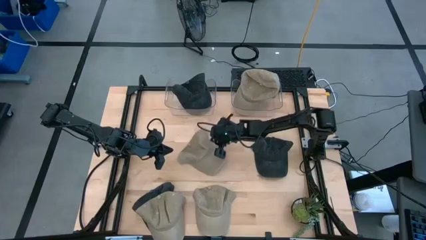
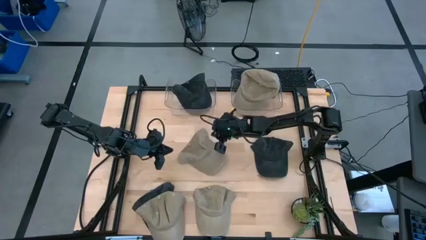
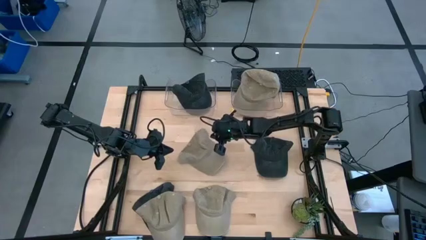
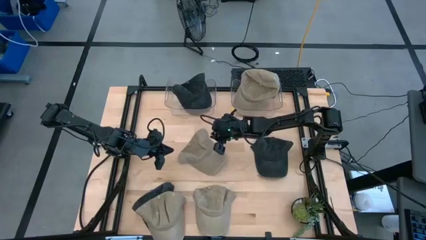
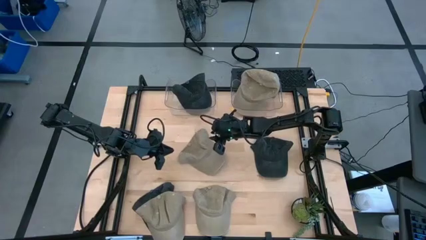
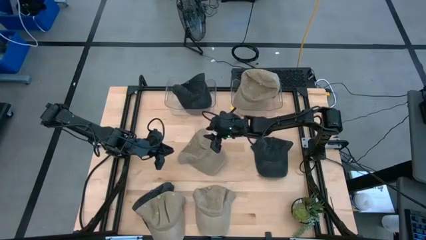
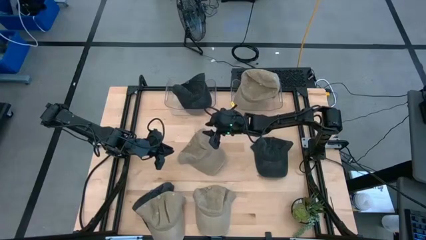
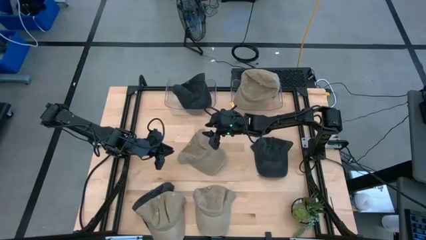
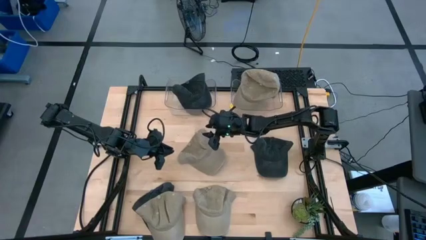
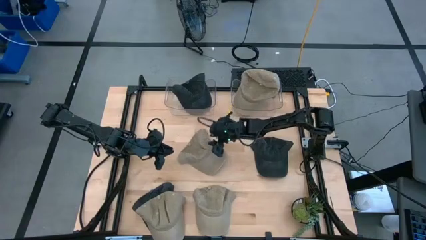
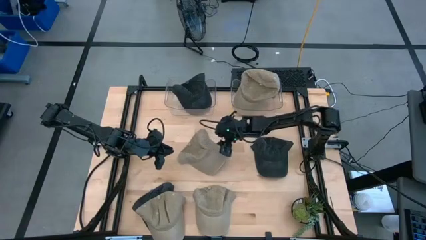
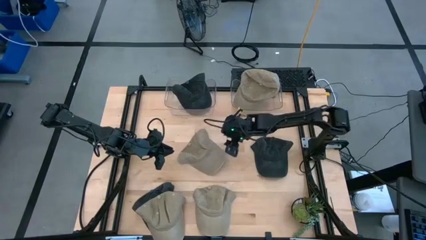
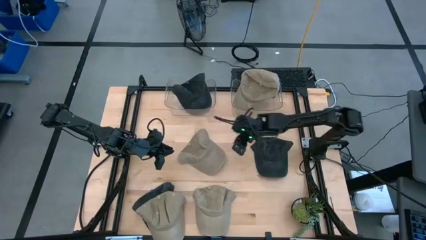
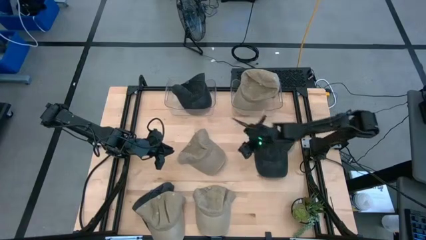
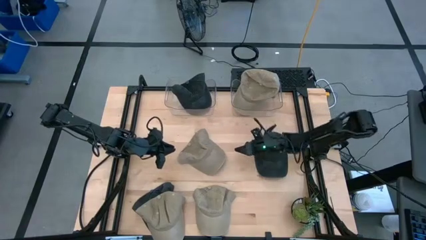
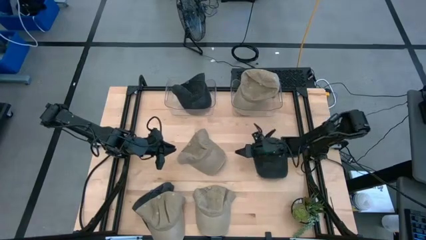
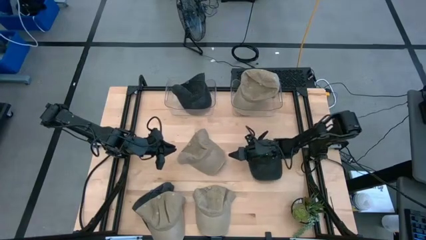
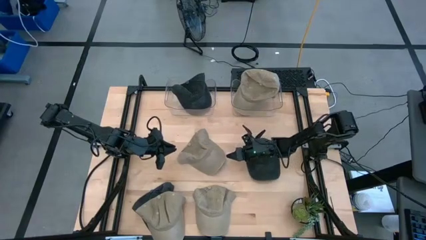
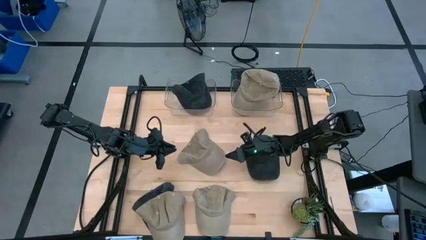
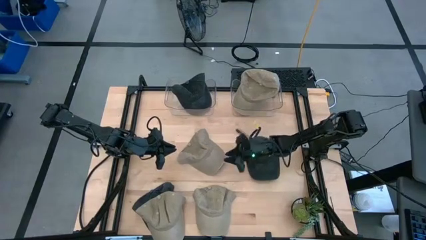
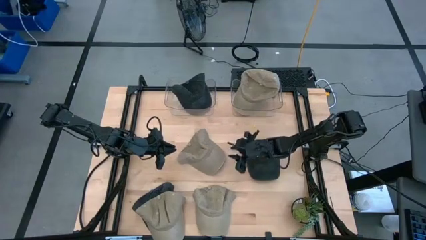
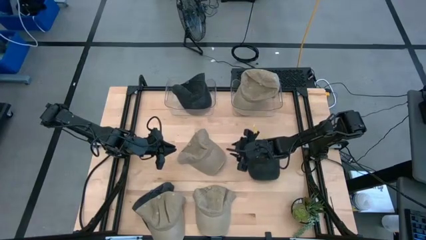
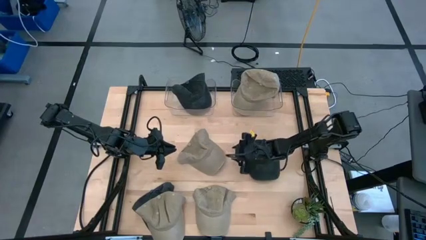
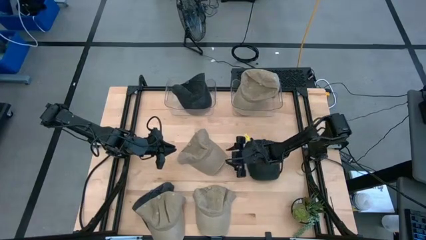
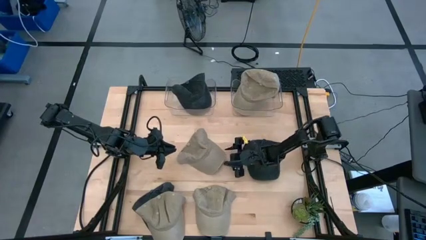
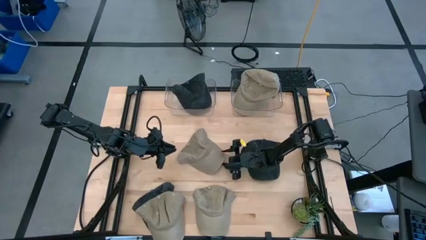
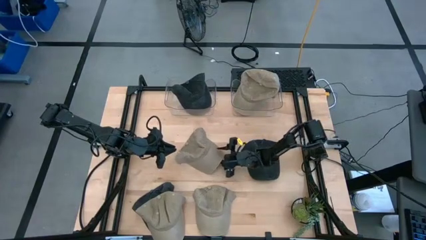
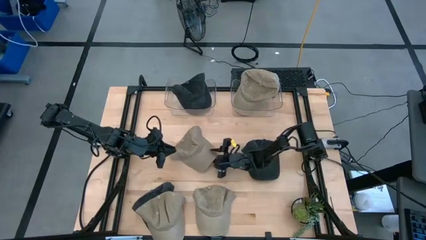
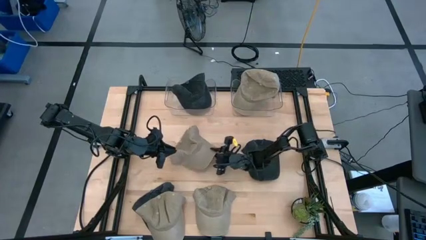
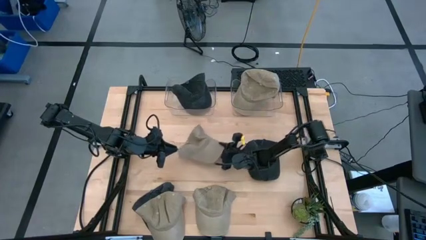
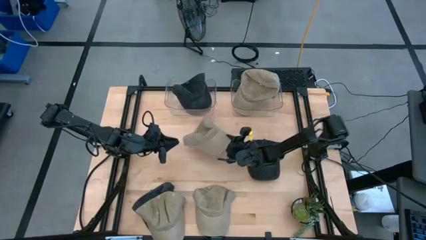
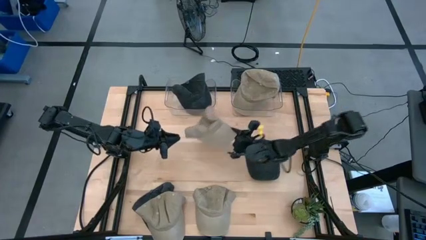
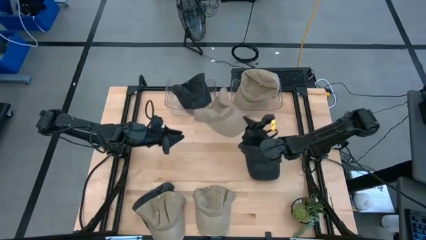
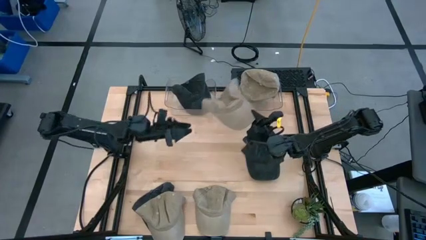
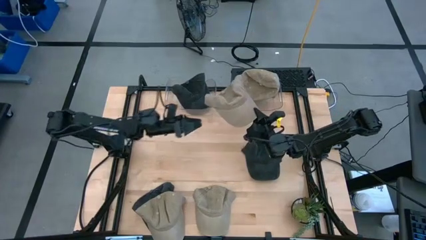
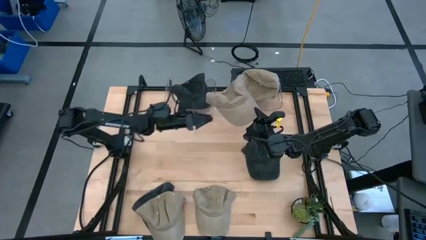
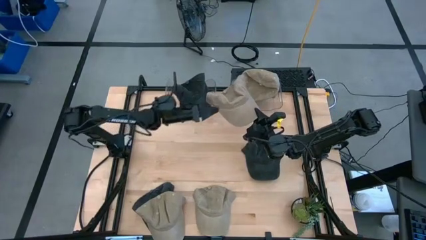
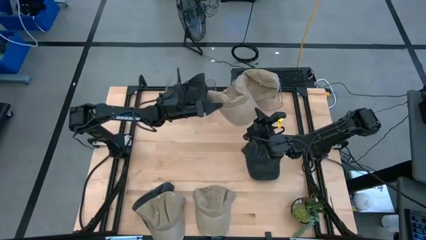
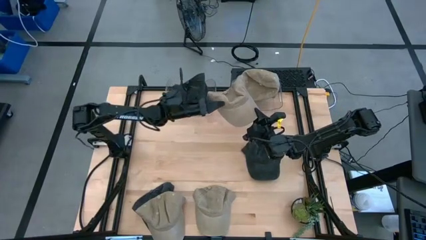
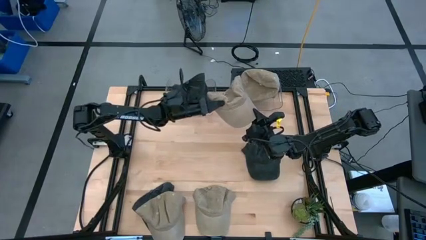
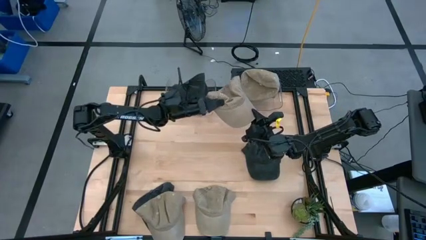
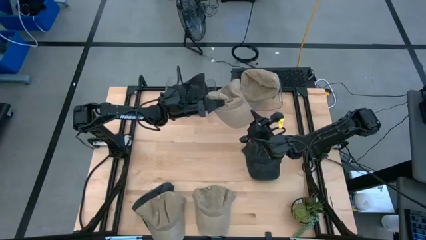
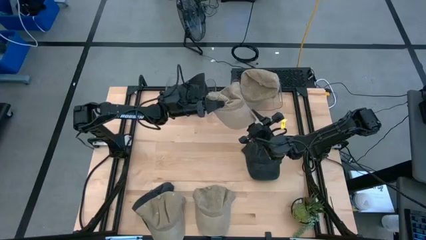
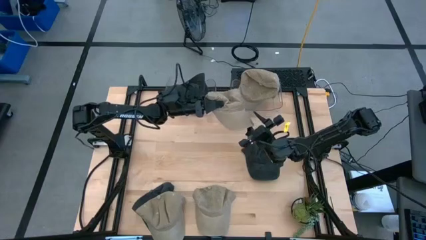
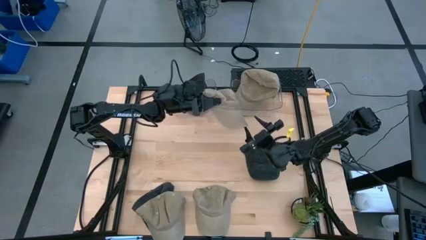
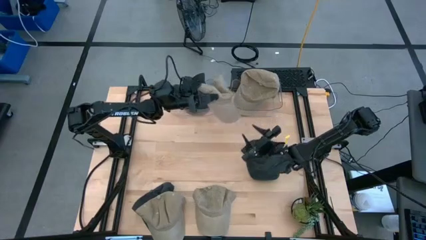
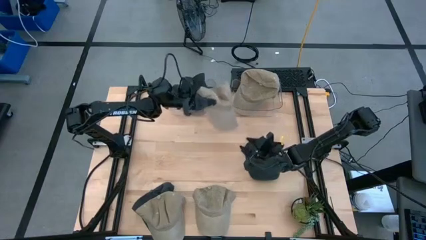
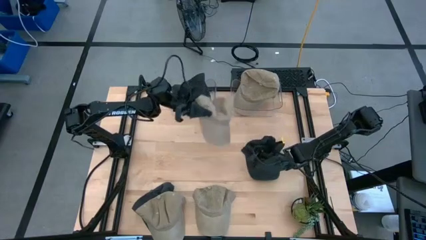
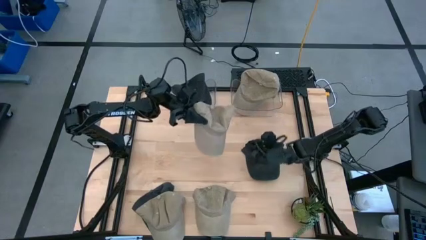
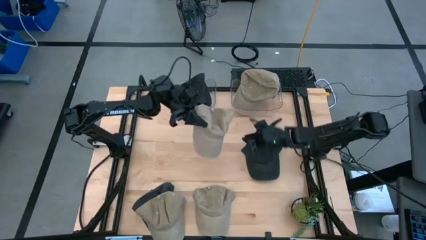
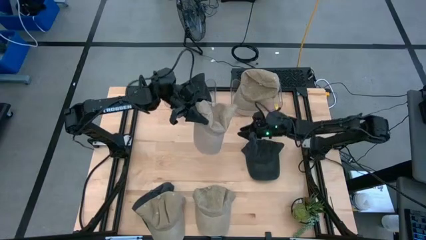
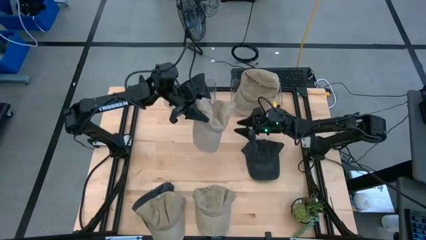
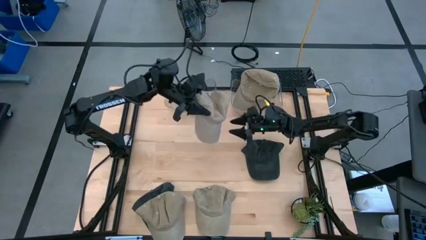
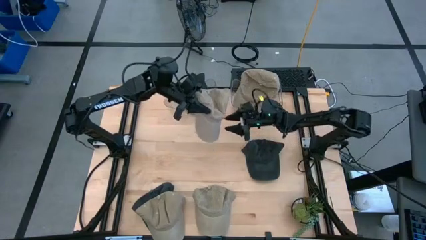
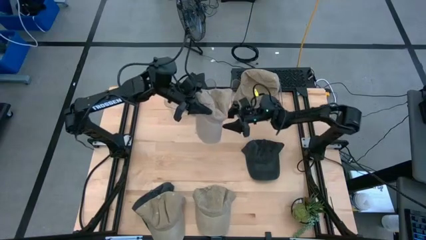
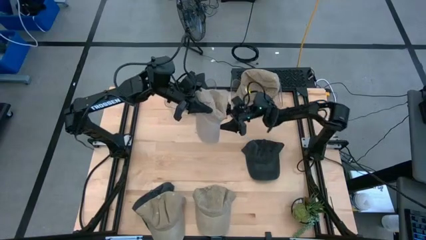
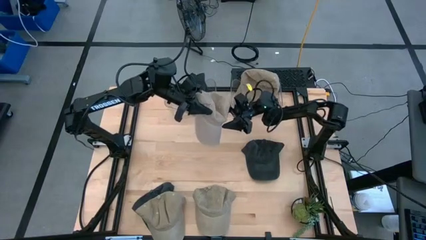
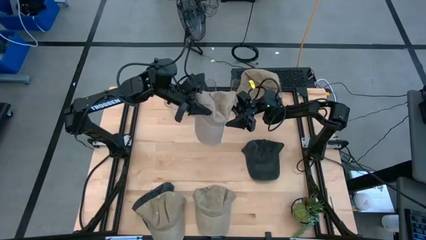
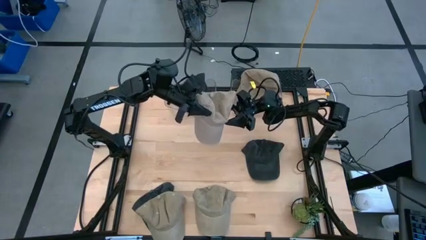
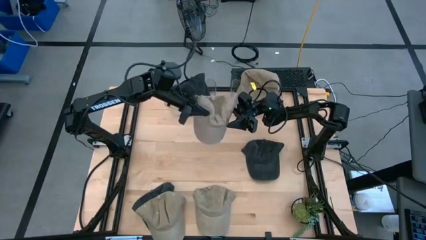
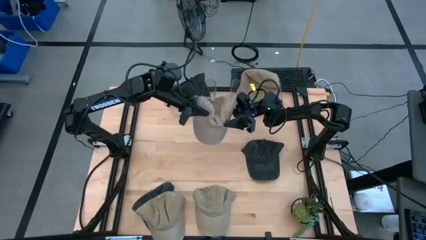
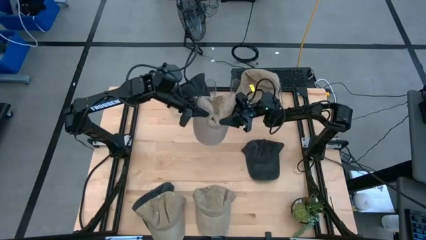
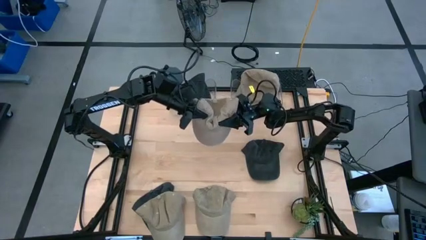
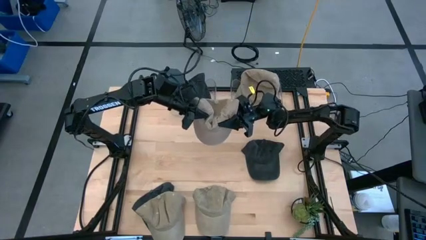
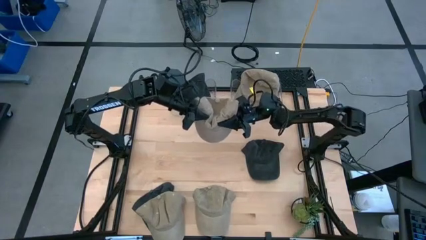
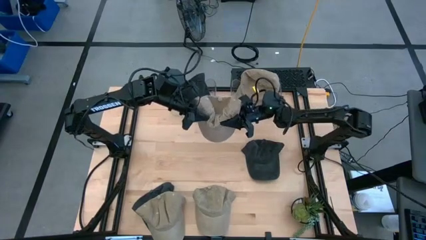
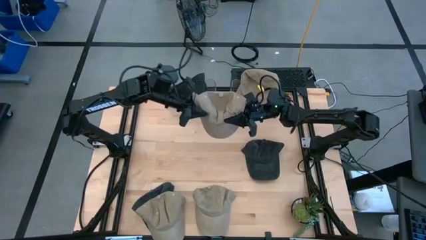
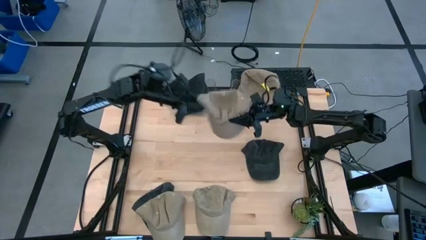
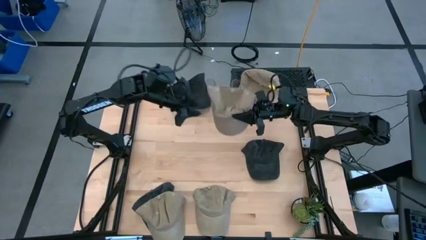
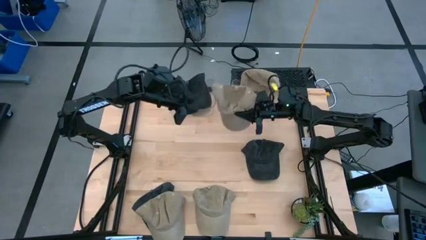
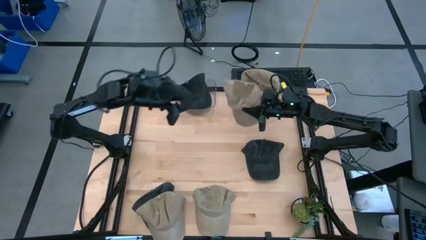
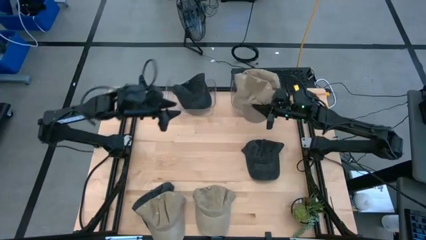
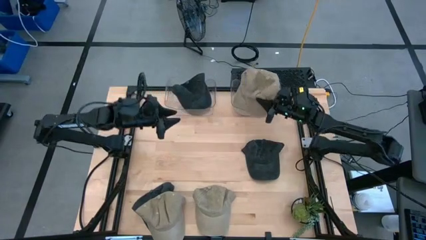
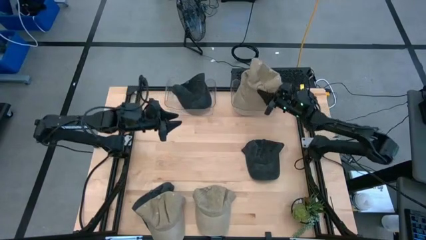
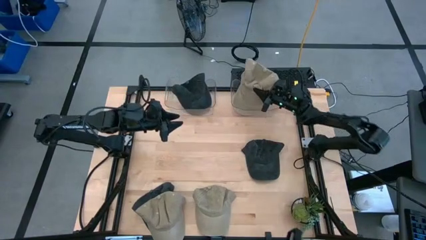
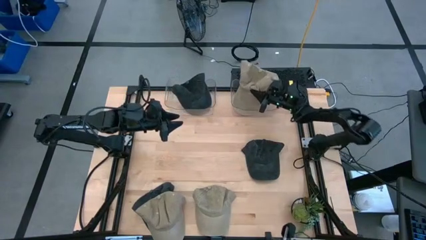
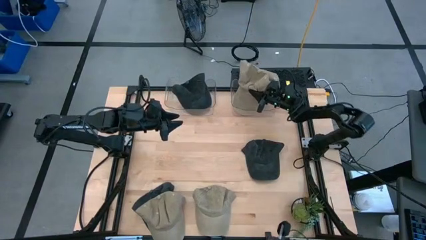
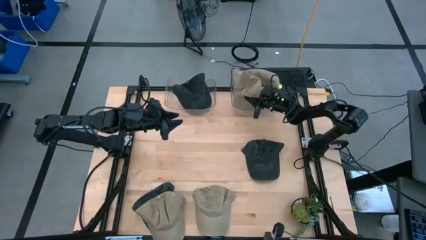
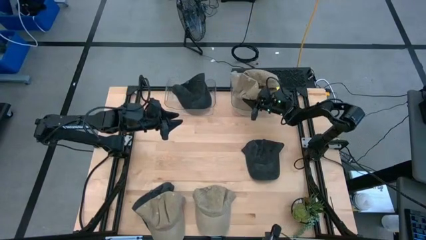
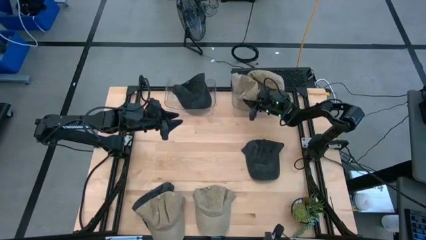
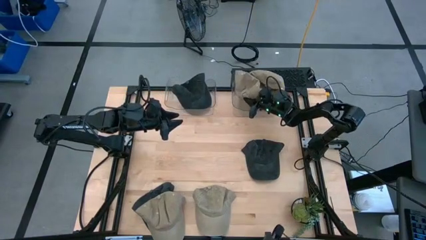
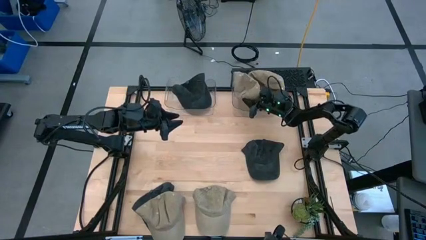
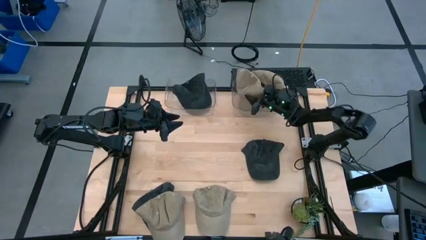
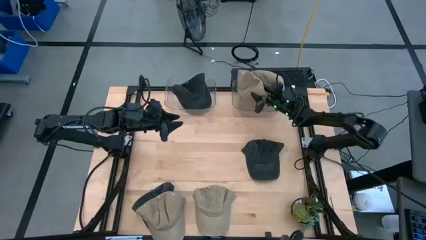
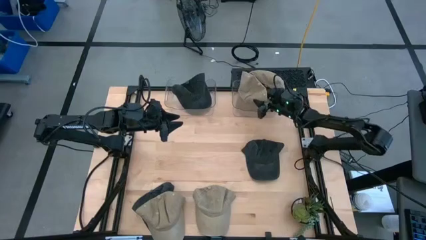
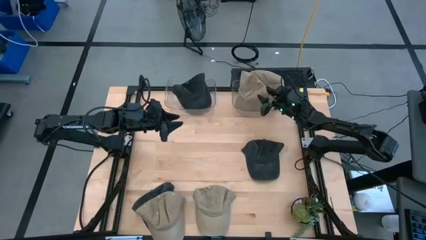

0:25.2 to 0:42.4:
Task: Pick & Place hat
Put the brown cap into the right transparent bin
